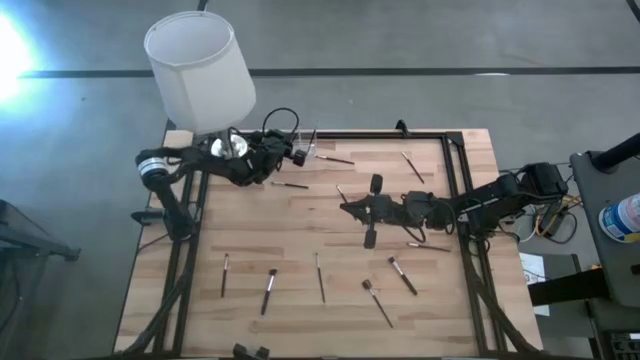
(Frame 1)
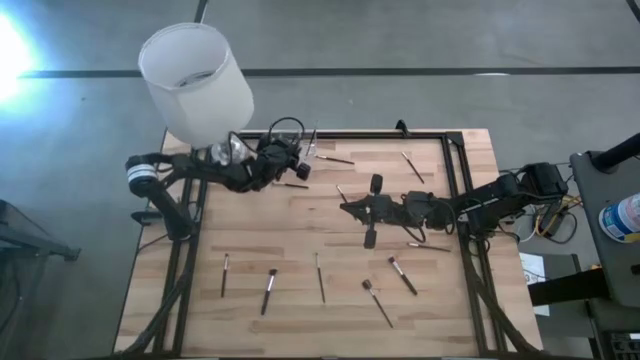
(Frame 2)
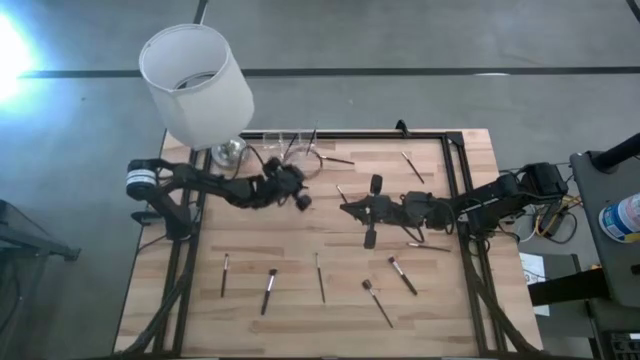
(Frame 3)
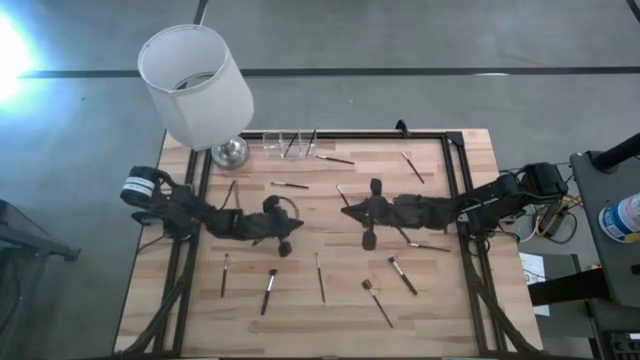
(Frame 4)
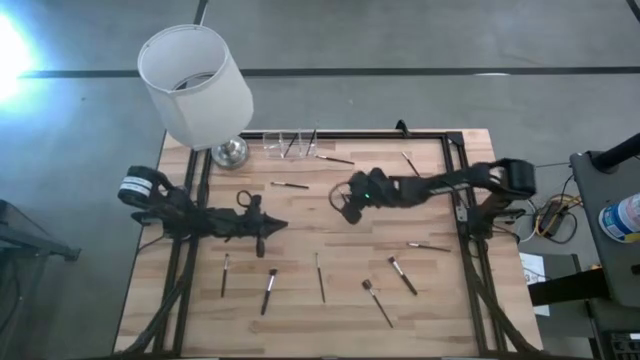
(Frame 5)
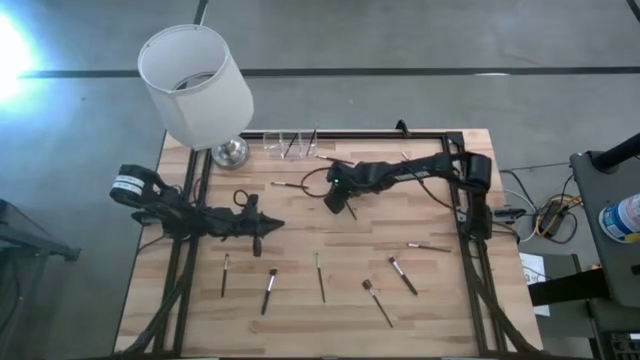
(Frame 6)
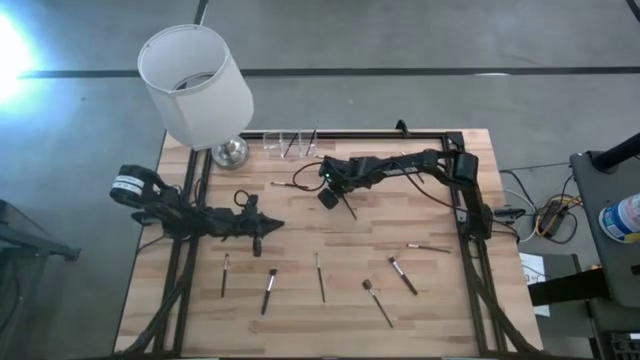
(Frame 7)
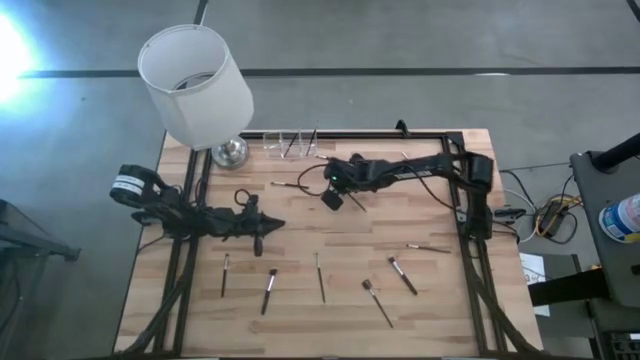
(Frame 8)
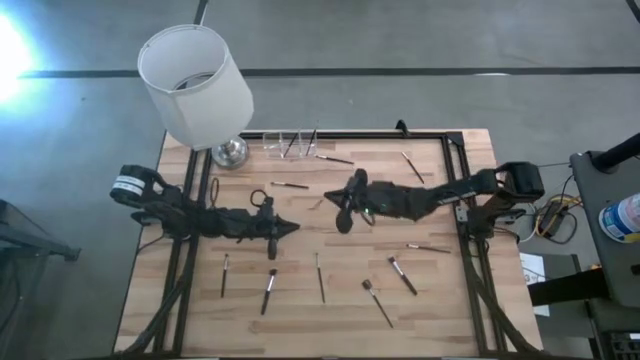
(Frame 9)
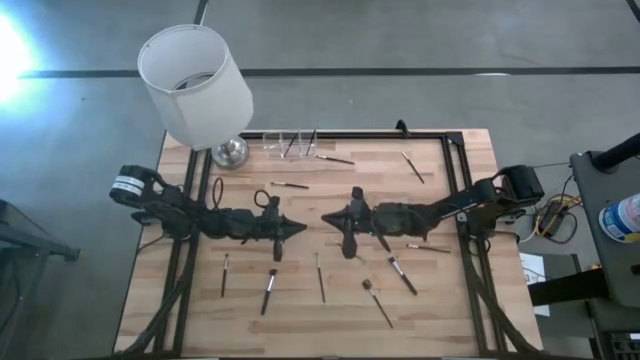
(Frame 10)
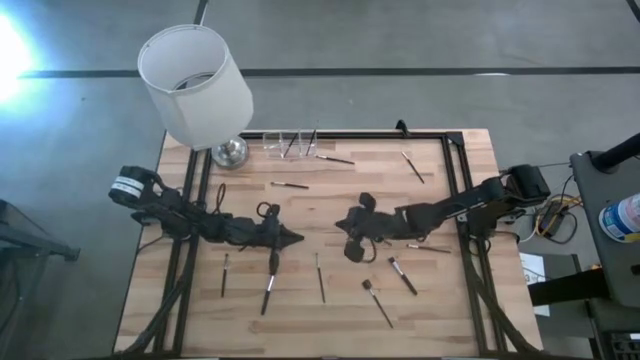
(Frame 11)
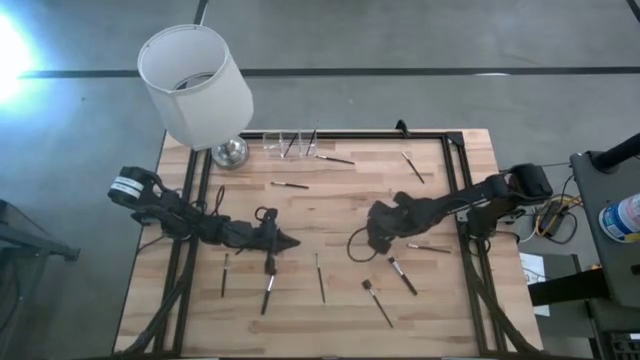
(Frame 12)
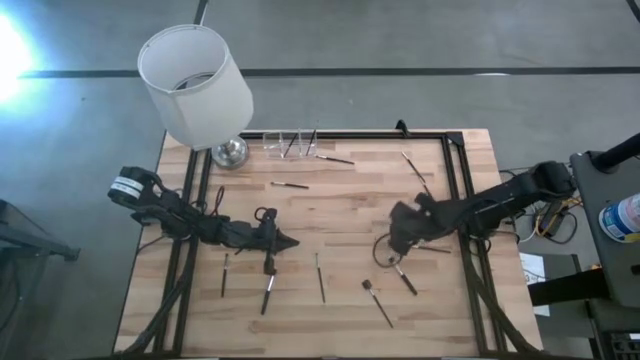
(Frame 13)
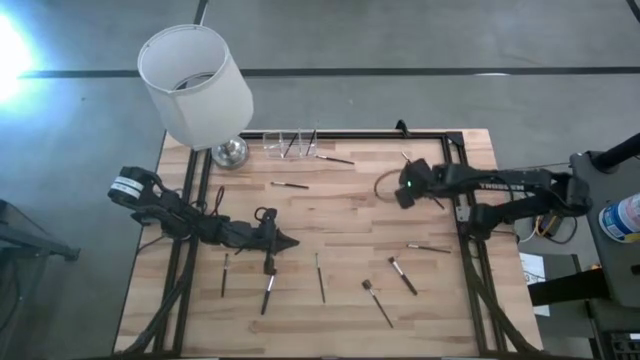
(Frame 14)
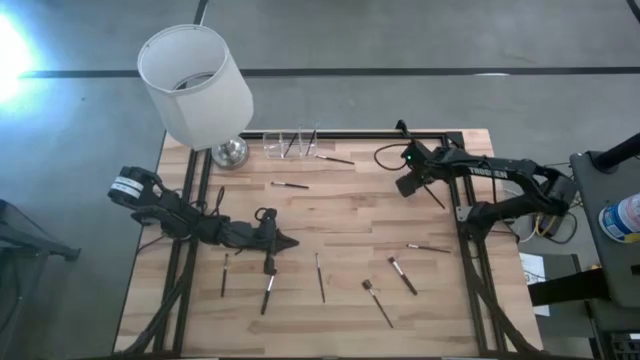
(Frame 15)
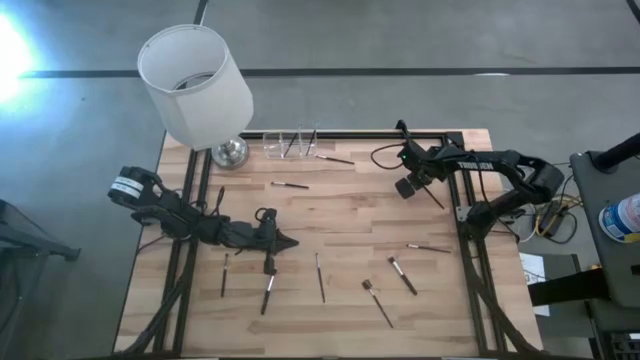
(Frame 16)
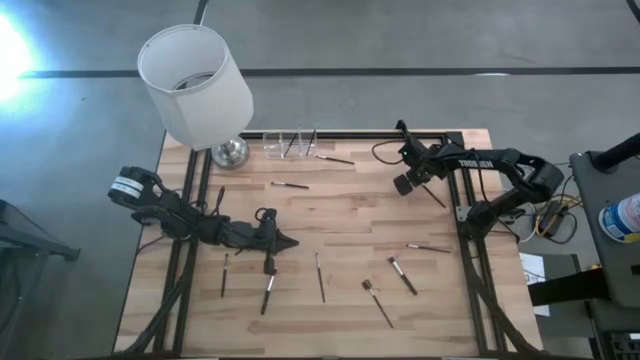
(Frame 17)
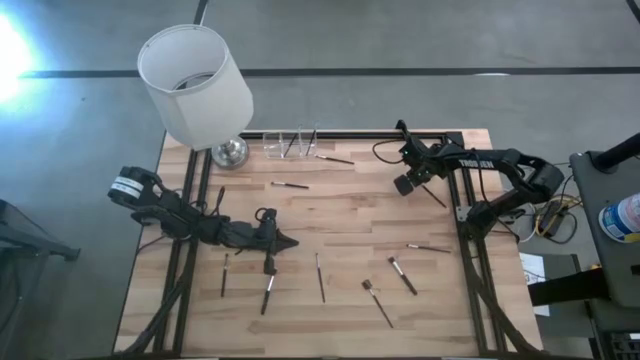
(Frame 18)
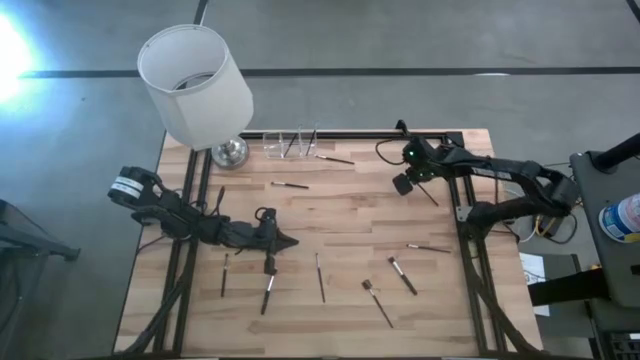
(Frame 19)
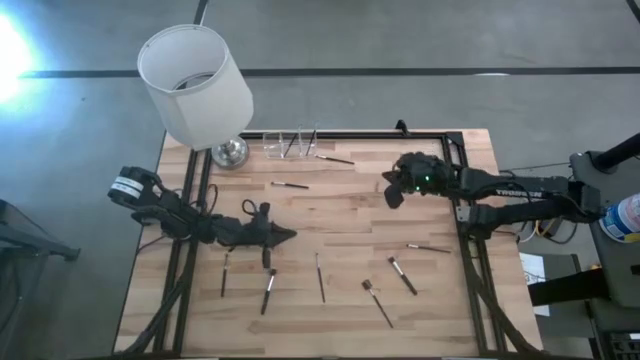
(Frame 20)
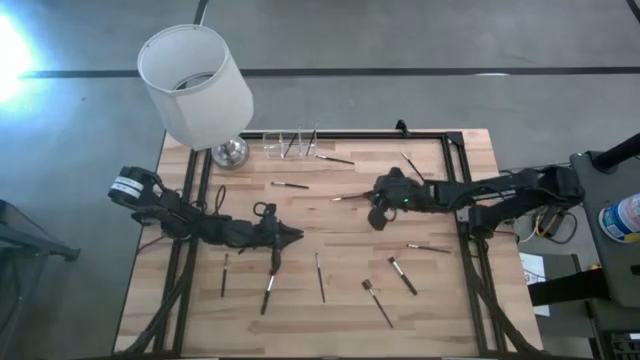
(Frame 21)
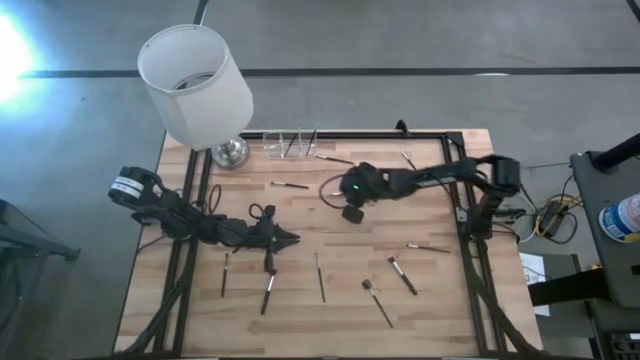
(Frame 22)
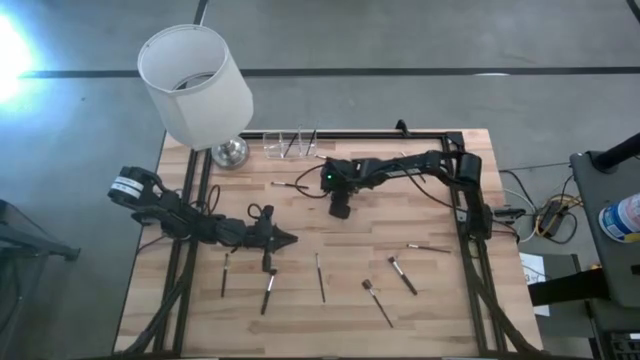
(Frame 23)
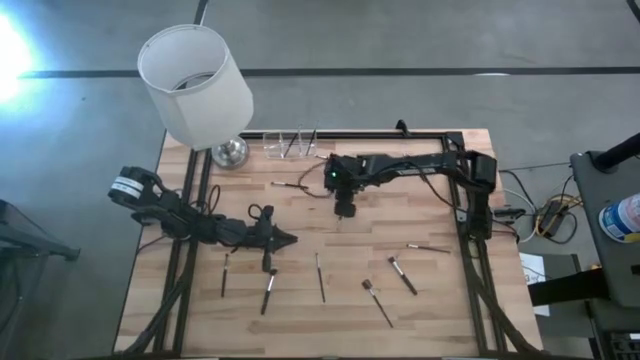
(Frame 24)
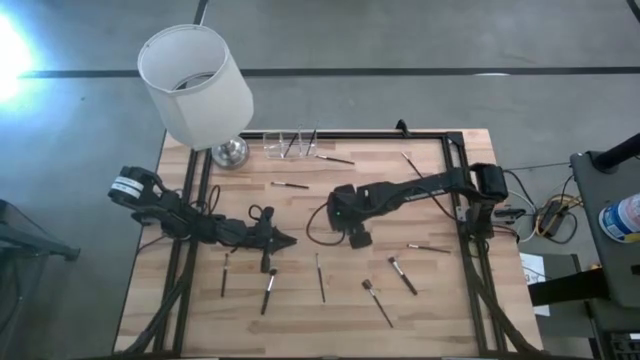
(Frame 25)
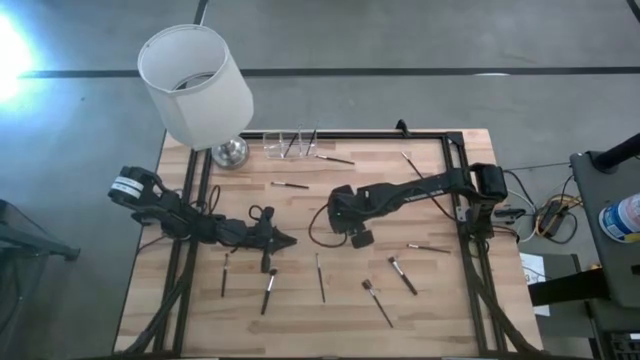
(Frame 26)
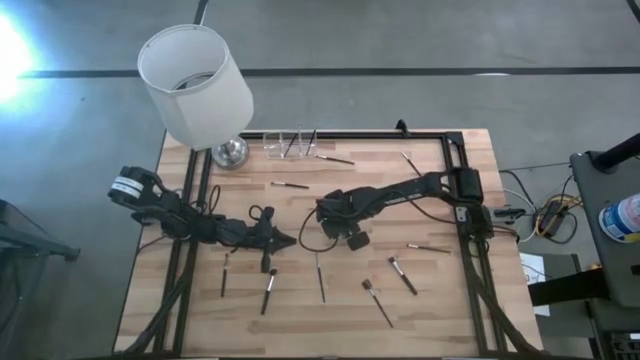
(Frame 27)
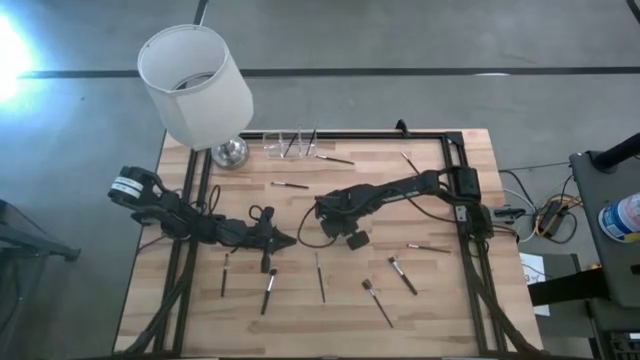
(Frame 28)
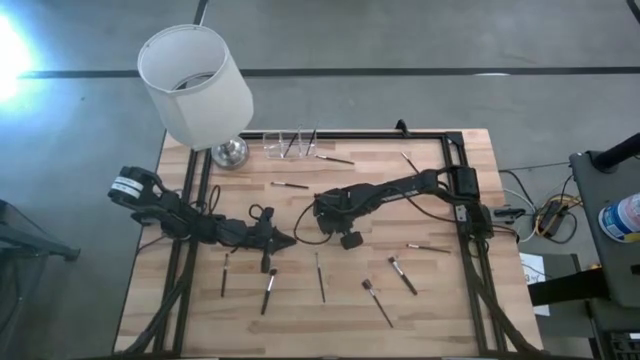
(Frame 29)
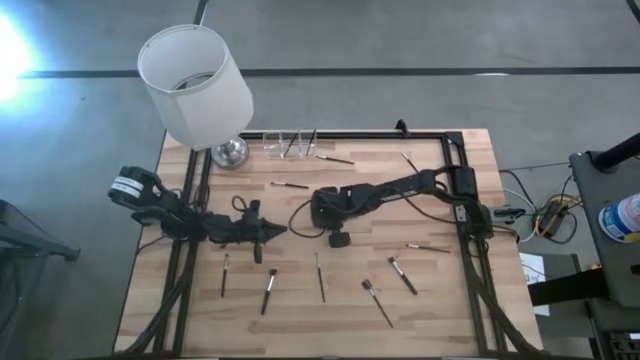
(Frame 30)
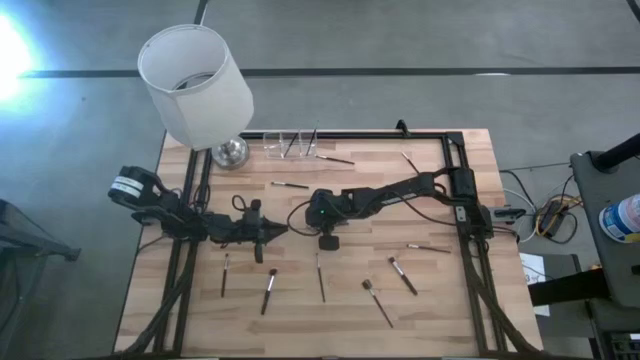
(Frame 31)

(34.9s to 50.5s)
Task: Put items in baskets/containers
Put the eyeshadow brush into the transparent organizer

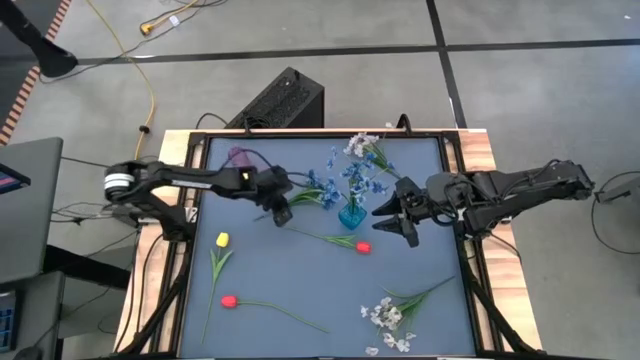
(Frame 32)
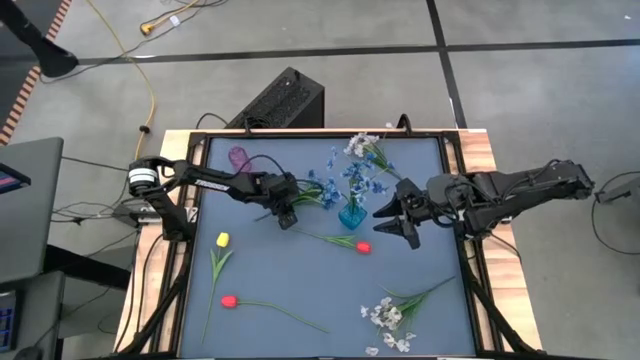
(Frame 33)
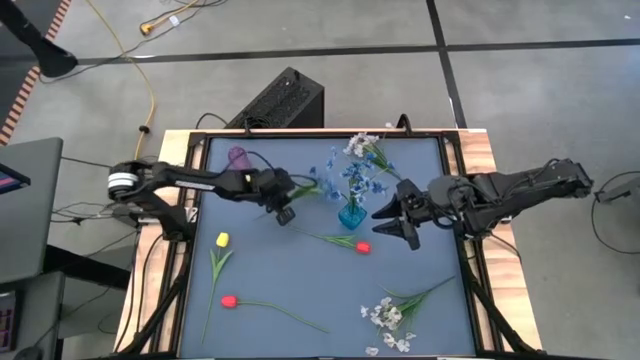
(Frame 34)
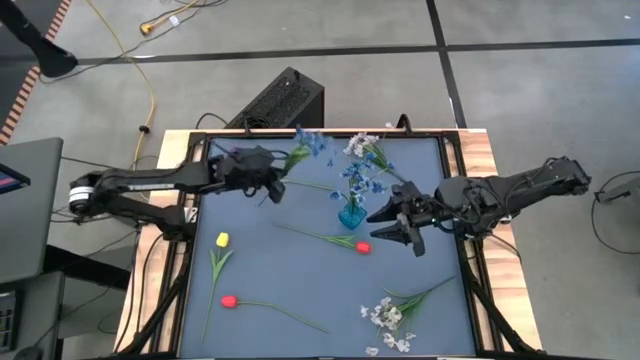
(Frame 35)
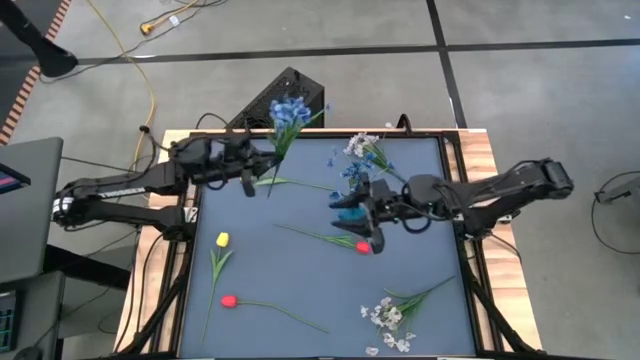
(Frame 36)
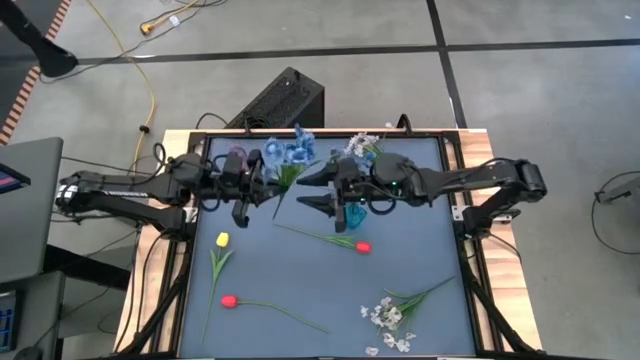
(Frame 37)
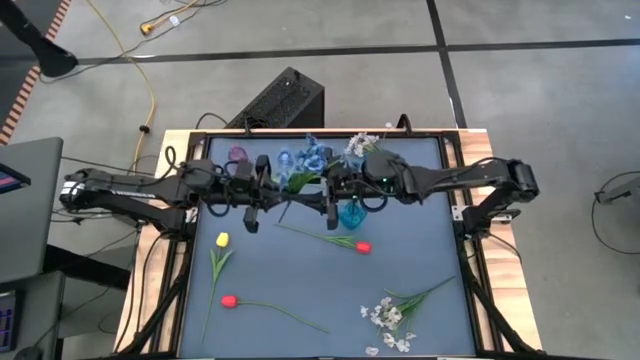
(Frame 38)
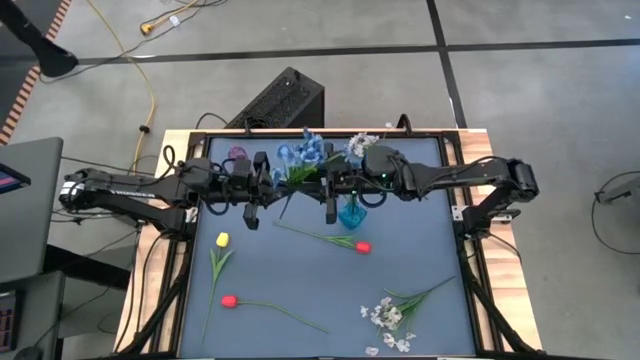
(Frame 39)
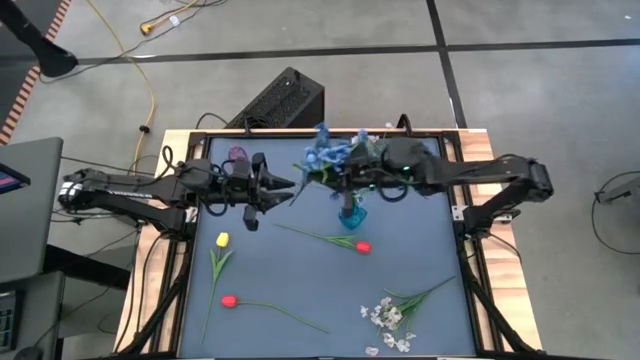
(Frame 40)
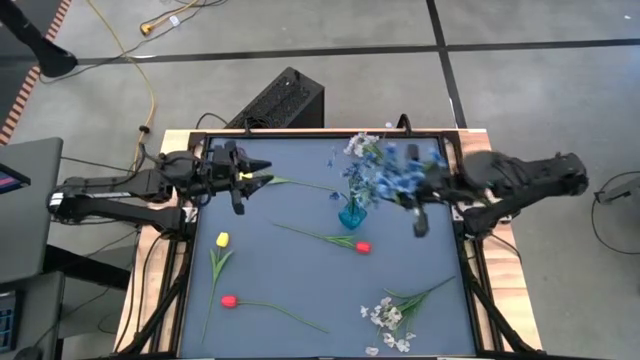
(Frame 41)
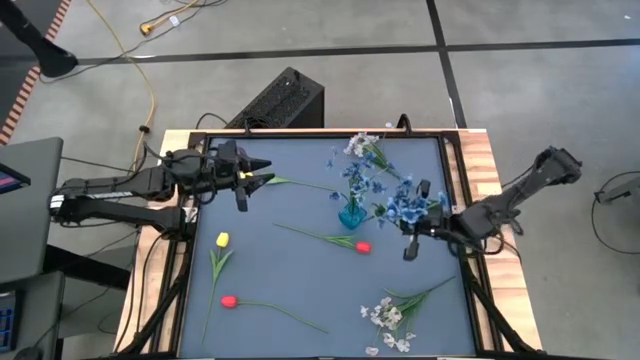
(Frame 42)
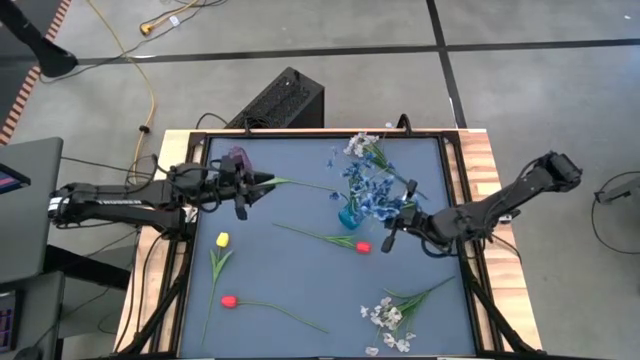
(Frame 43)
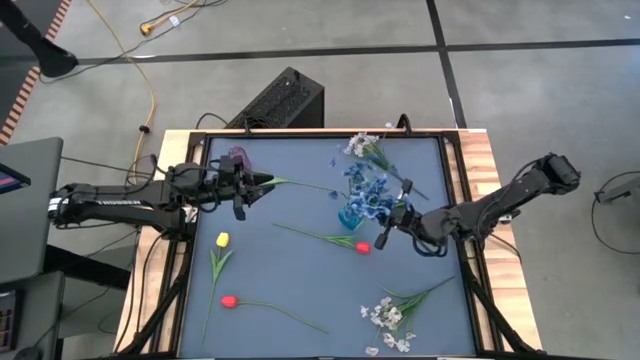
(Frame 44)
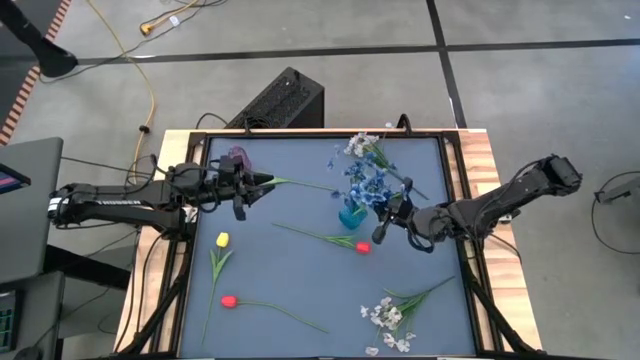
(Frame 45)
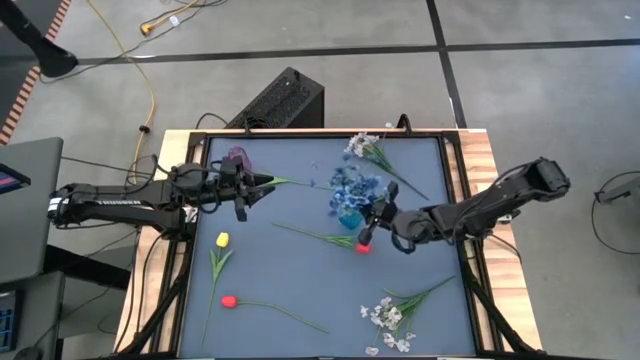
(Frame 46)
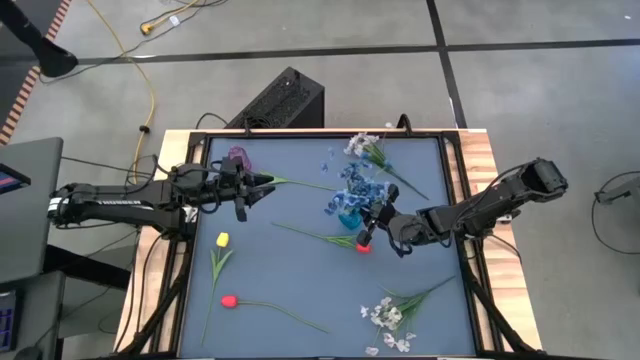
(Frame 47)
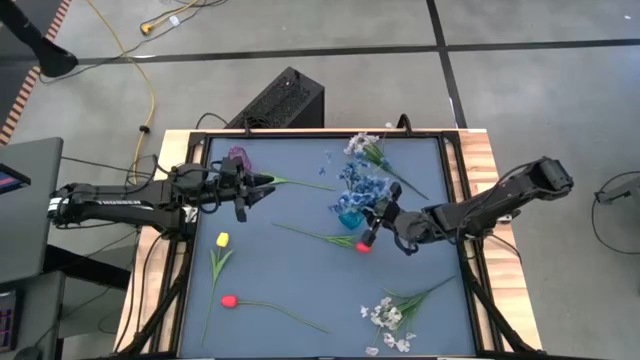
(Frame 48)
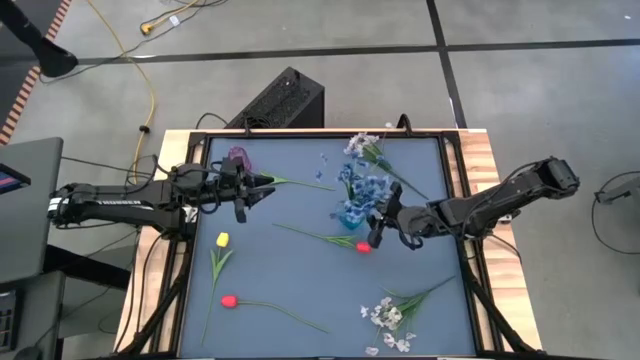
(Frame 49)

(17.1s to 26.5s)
Task: Sort flowers into vase by color
Put the blue flowers into the blue vase
